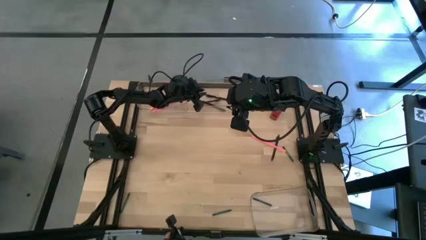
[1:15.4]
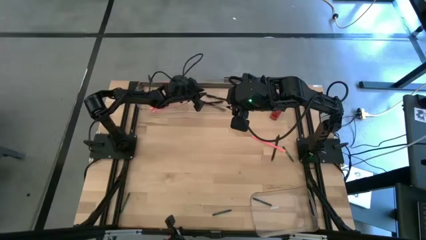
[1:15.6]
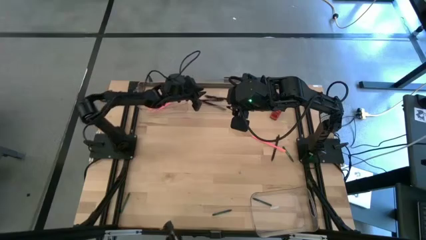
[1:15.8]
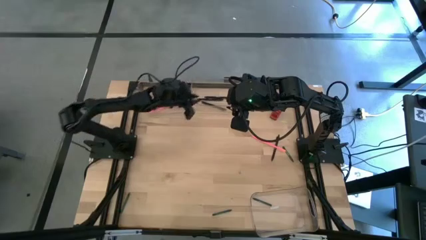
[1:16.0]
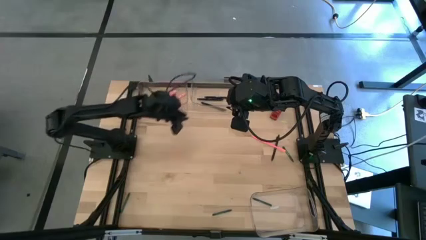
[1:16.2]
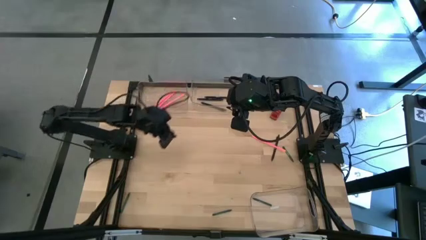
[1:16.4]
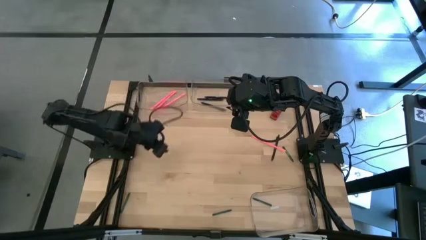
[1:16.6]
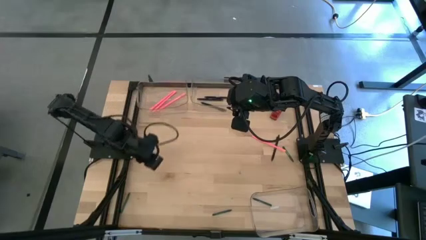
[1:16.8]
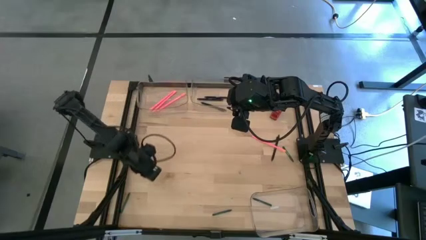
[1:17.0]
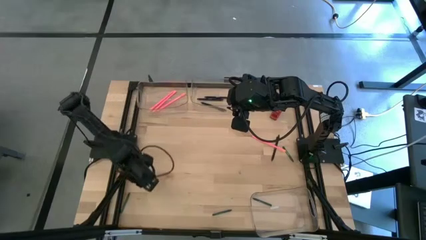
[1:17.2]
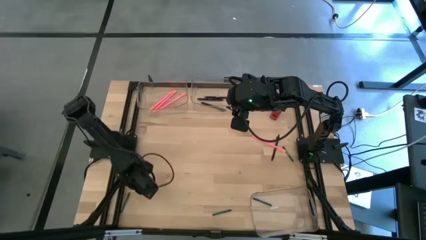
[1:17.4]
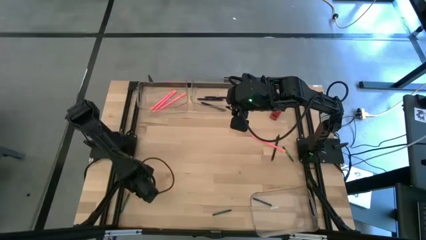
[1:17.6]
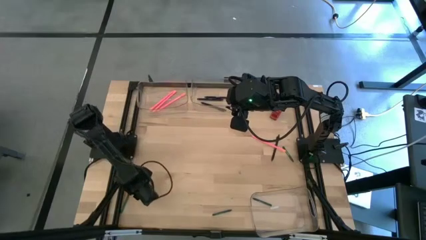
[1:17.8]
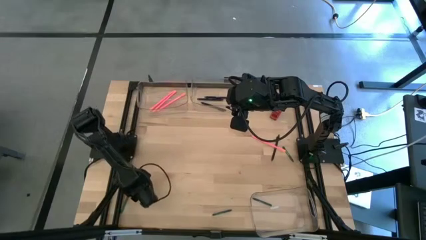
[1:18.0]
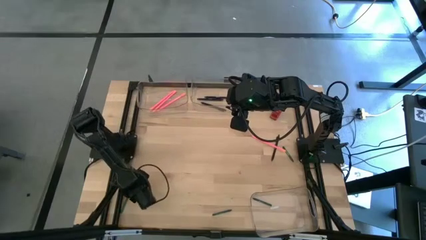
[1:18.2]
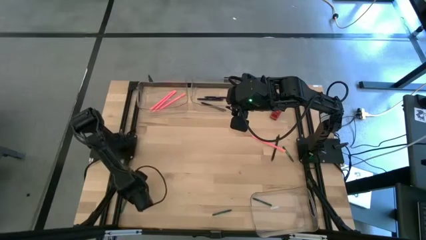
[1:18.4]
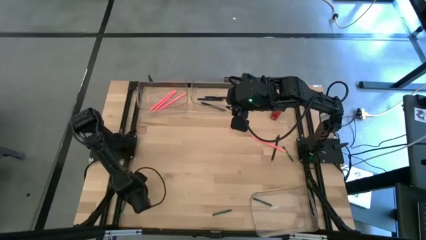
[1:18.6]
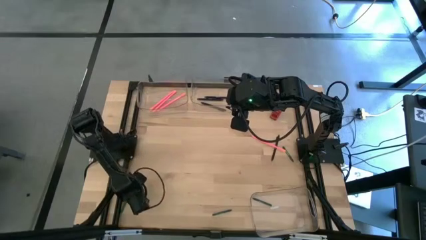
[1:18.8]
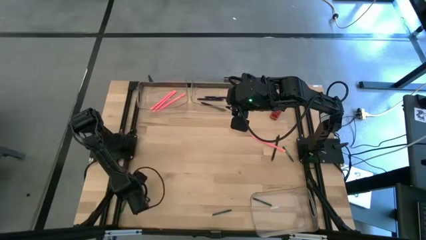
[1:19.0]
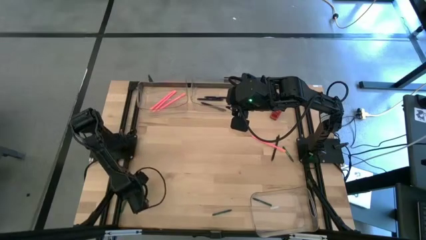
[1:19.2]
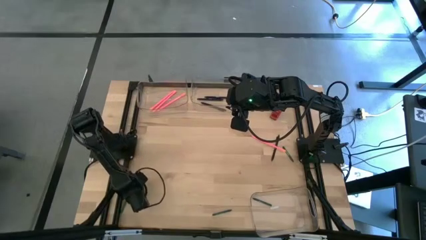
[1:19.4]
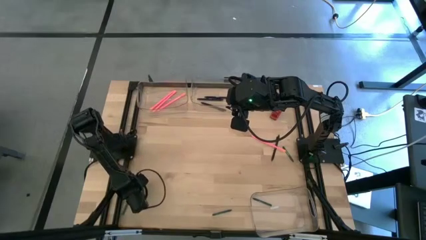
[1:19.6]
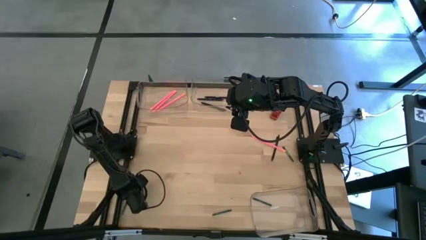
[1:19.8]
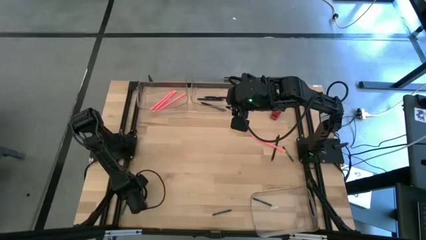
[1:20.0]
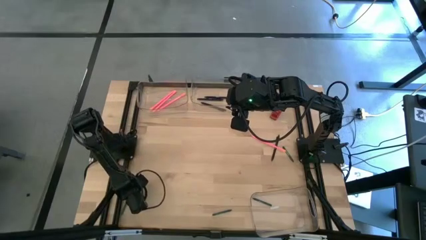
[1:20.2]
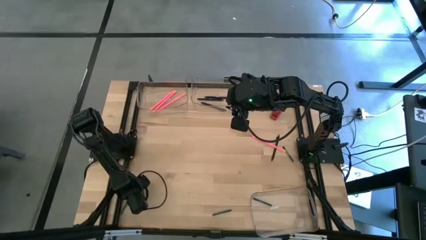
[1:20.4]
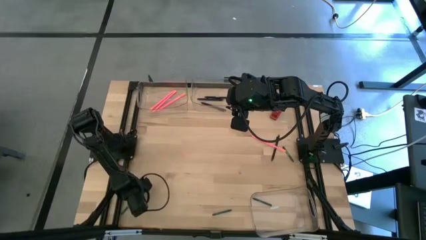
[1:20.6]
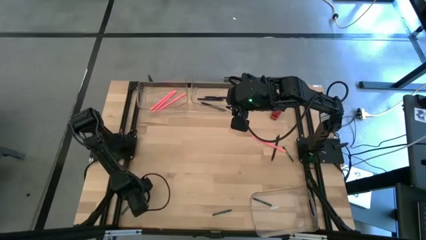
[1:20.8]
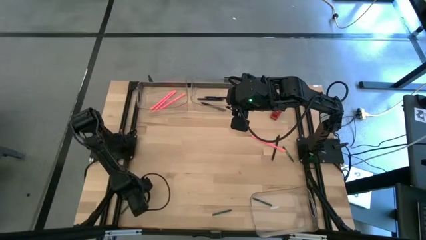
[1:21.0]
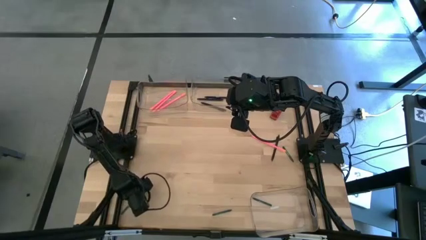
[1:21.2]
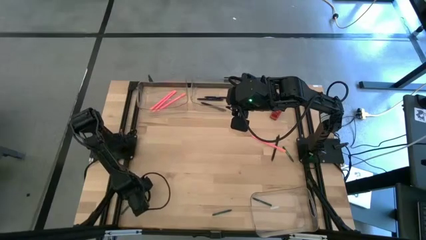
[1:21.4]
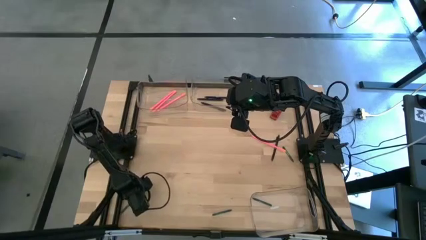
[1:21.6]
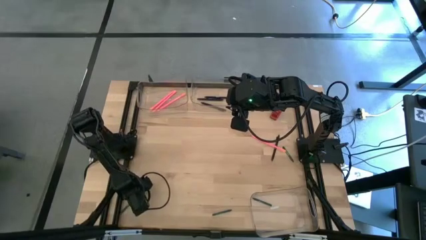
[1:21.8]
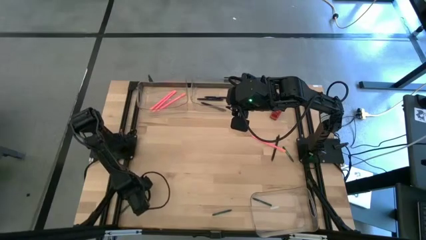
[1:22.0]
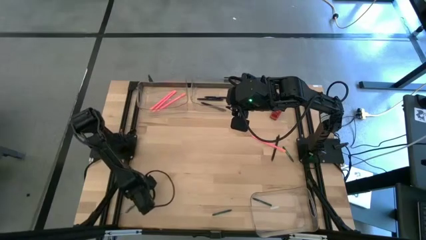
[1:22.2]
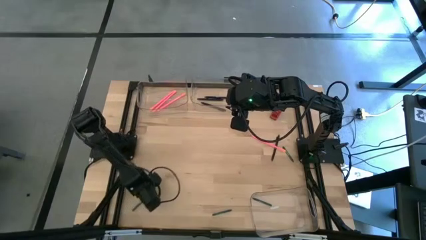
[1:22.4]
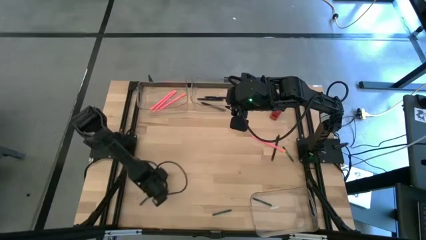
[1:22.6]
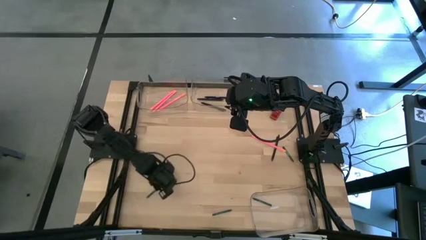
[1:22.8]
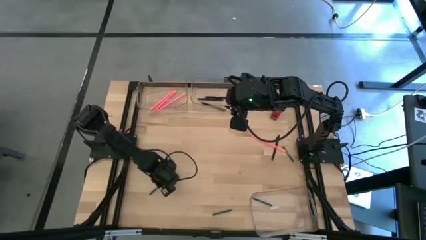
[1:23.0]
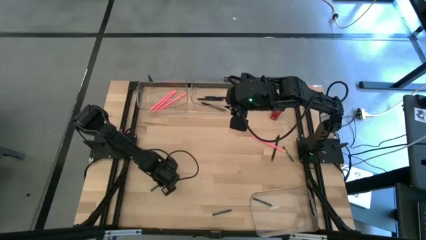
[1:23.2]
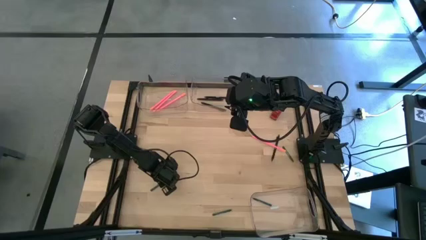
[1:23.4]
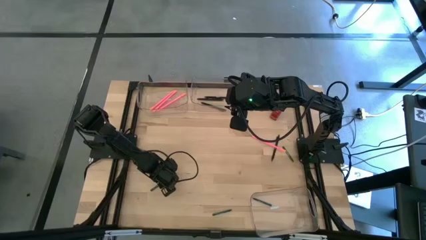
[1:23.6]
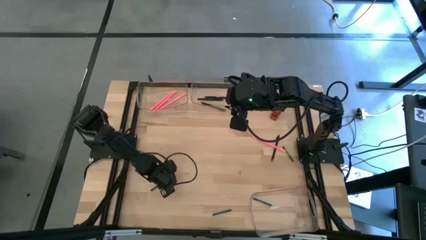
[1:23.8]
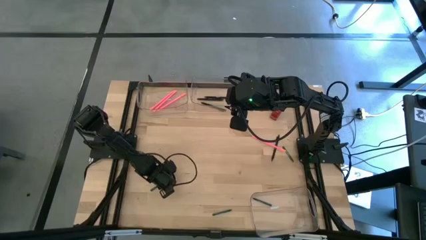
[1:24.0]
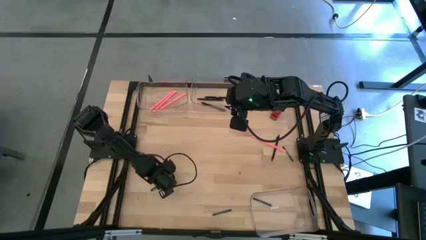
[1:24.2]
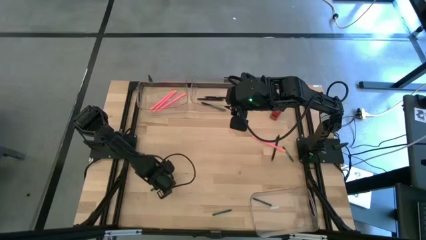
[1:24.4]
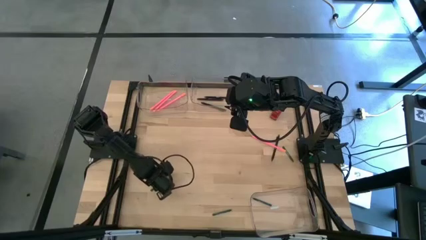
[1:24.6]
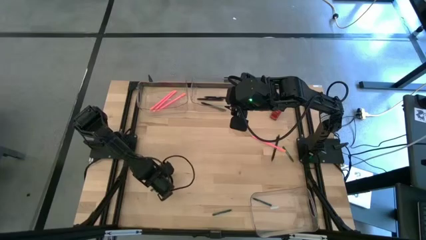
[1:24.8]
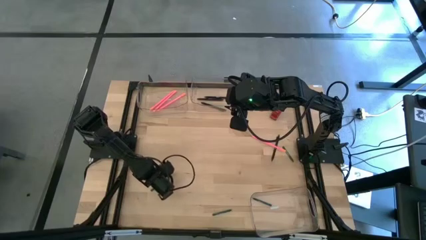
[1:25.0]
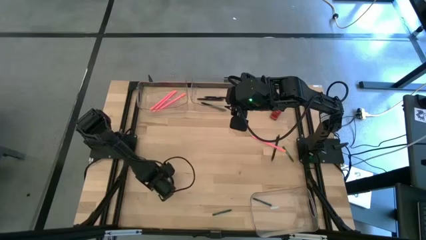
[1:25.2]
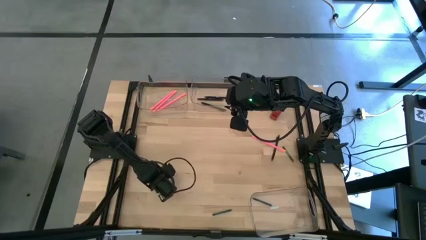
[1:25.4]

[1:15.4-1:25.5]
Task: Sort crayons/erasers/pens/pencils in bins
Put the green crayon into the bottom transparent bin

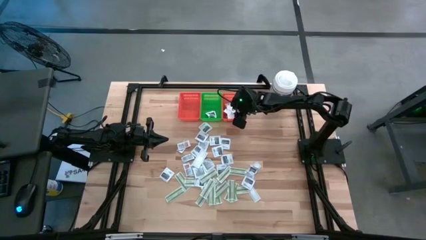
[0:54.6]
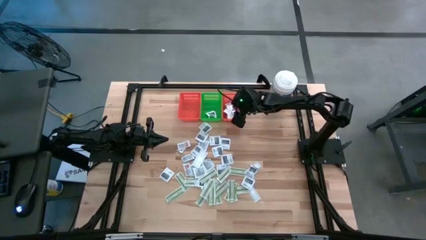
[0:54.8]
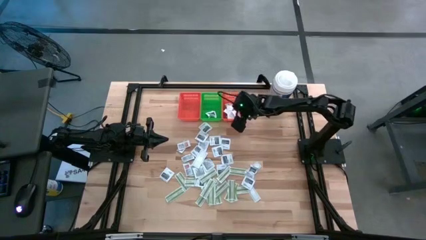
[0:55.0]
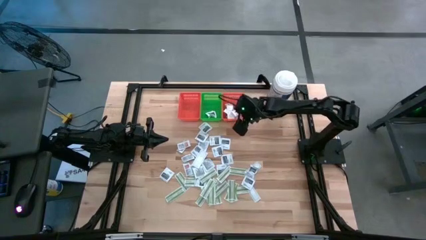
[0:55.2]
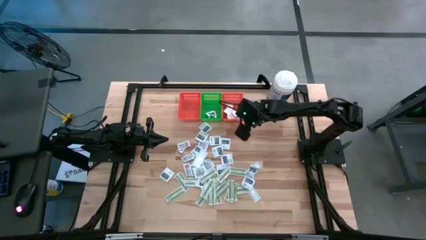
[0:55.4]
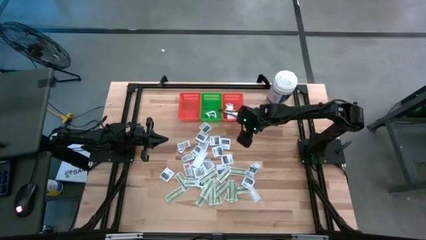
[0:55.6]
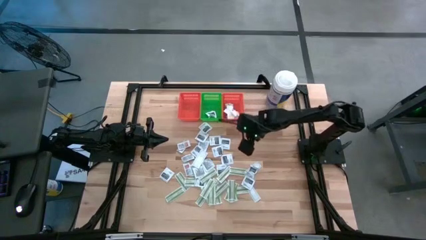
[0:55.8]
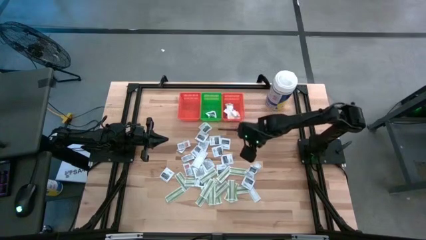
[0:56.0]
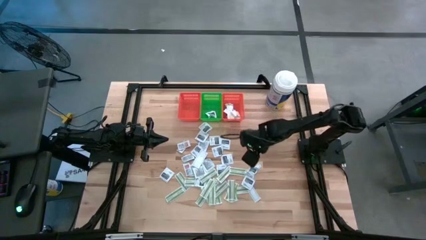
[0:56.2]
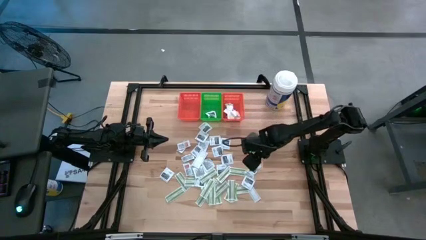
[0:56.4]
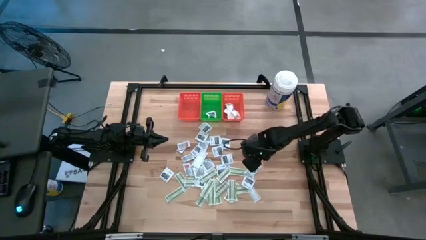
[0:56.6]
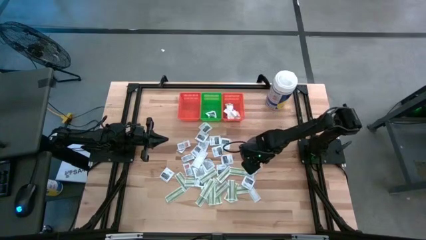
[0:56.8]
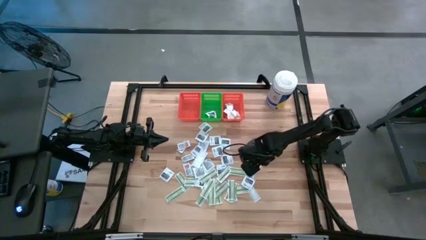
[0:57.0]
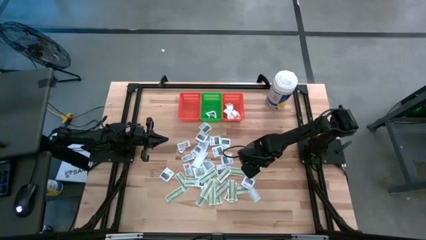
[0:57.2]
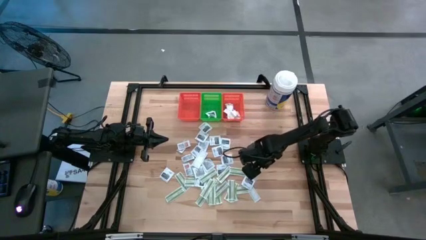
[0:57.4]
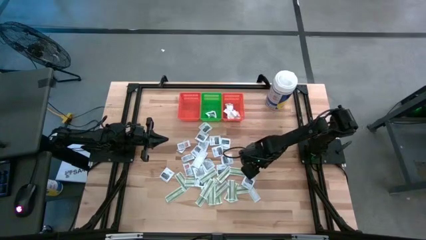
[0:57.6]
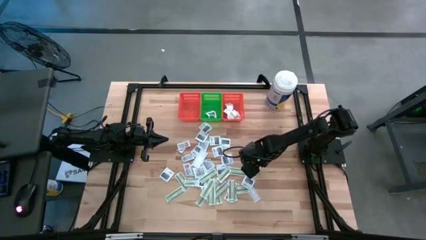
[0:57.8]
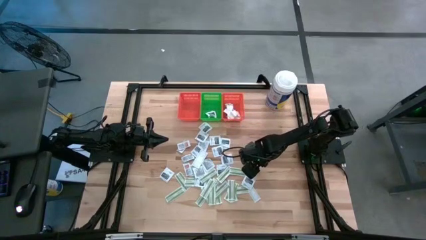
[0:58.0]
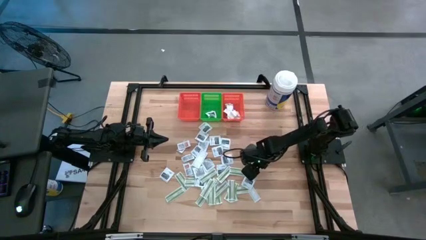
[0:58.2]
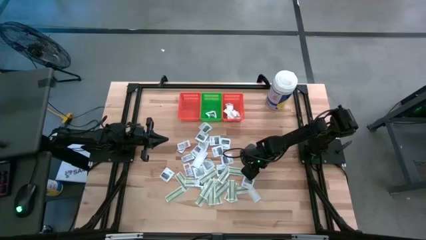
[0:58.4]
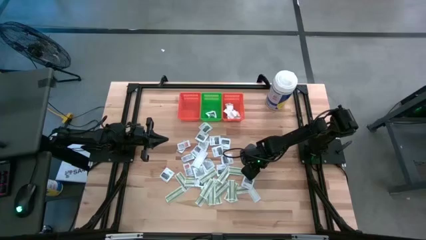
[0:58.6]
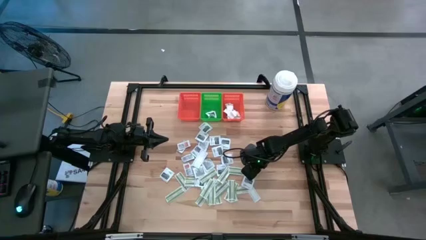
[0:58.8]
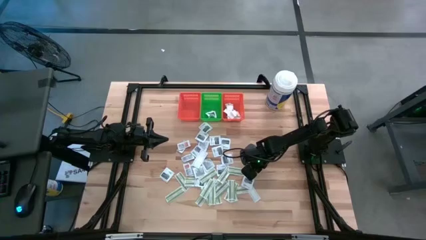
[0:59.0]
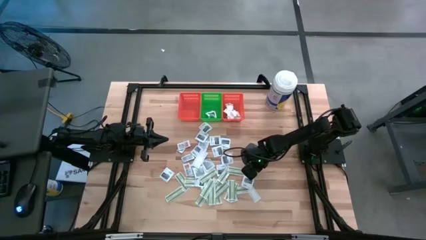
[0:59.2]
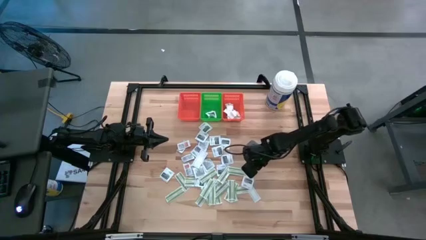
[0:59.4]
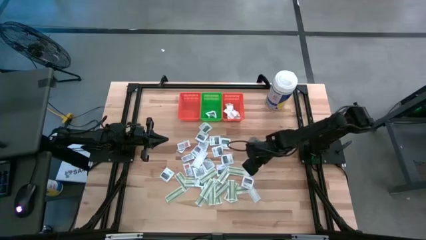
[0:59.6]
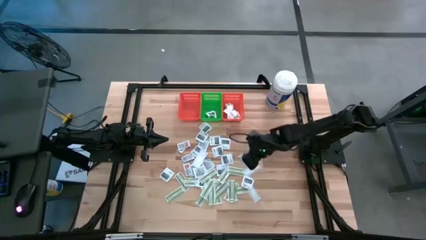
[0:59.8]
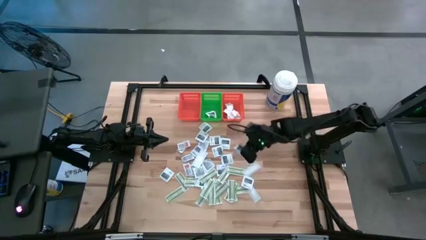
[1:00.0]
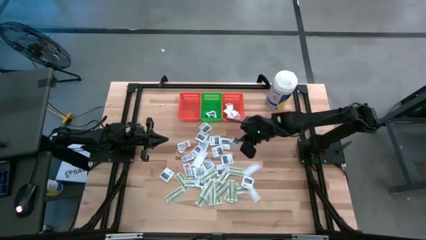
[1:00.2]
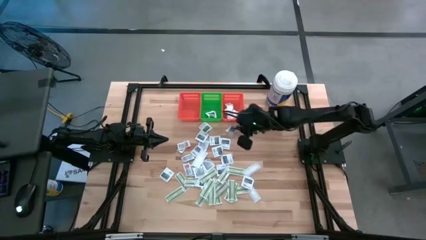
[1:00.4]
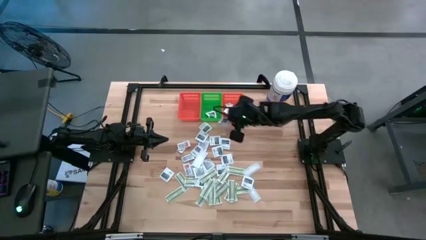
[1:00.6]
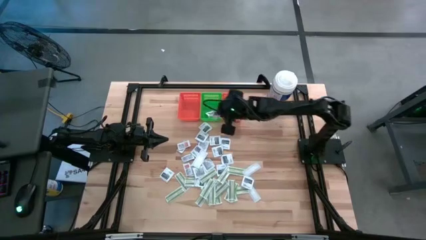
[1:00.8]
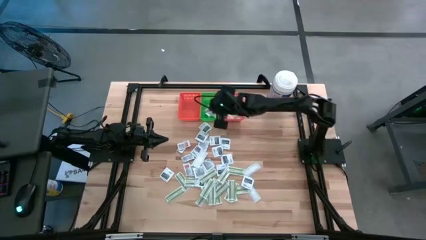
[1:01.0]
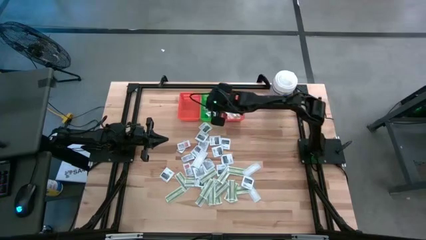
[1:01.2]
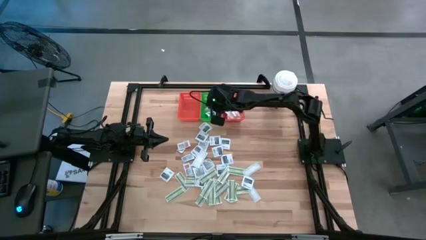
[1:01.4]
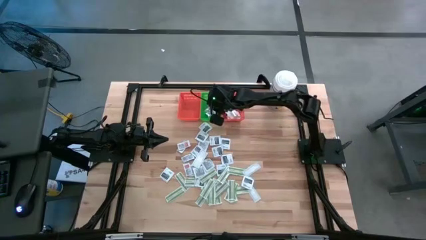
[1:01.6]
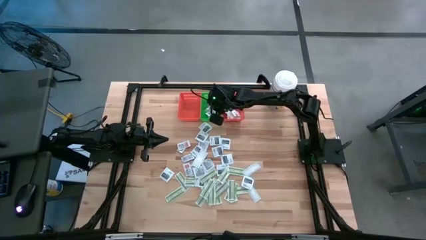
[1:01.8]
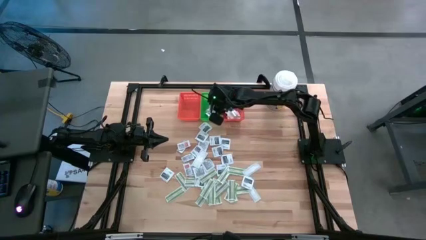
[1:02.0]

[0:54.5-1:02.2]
Task: Pick & Place First Aid Supplies
Put the towelette pack into the green bin
